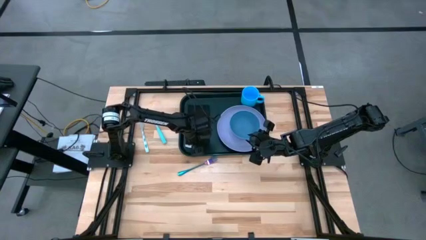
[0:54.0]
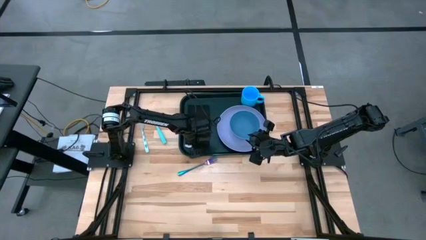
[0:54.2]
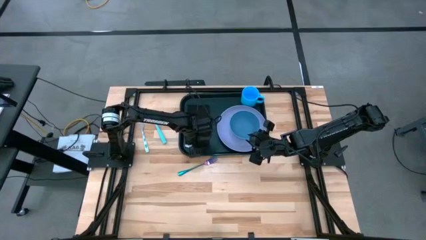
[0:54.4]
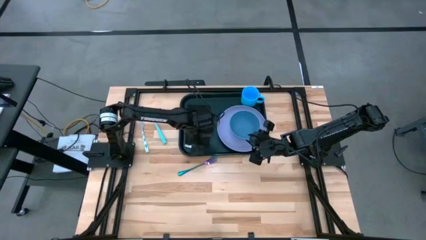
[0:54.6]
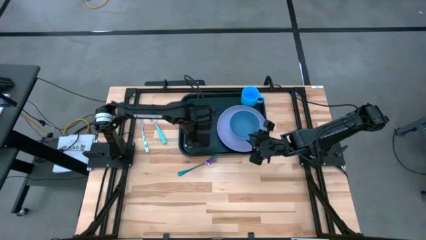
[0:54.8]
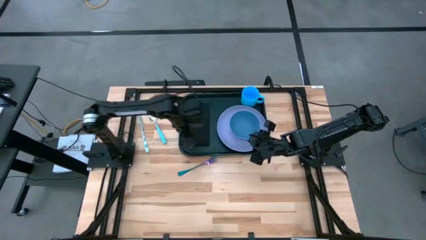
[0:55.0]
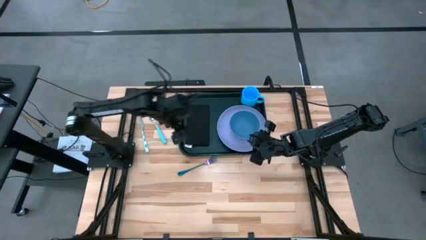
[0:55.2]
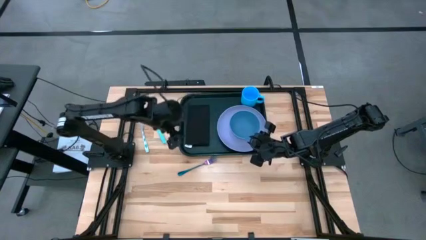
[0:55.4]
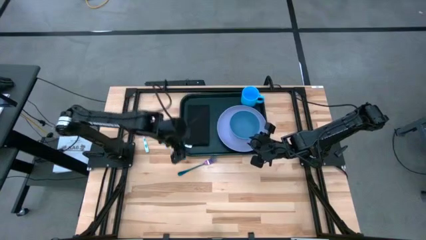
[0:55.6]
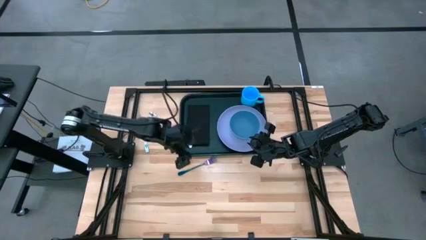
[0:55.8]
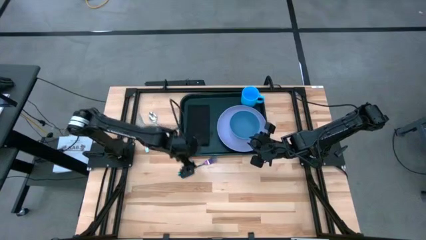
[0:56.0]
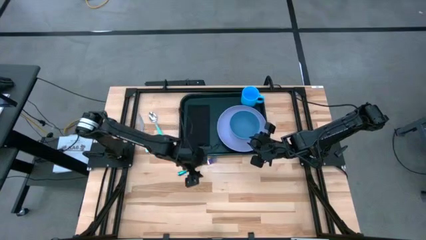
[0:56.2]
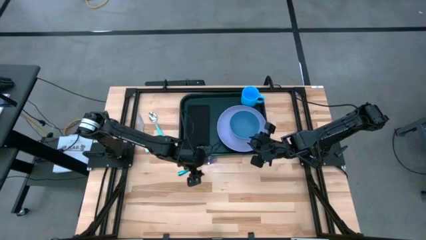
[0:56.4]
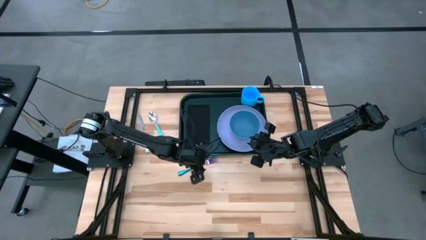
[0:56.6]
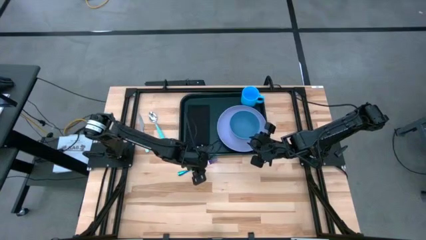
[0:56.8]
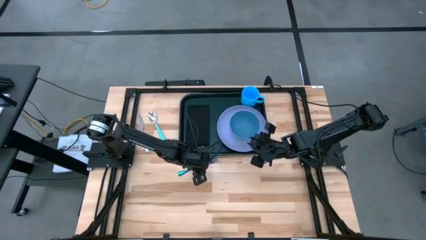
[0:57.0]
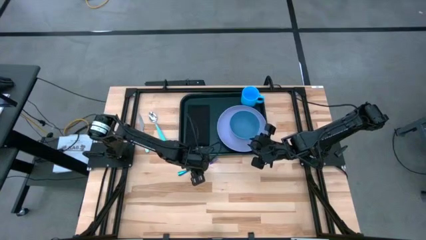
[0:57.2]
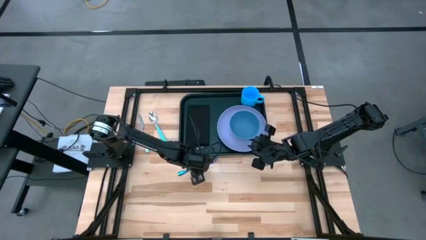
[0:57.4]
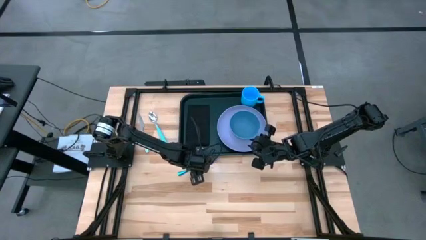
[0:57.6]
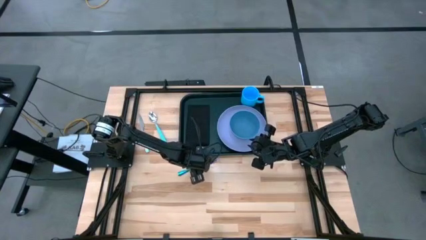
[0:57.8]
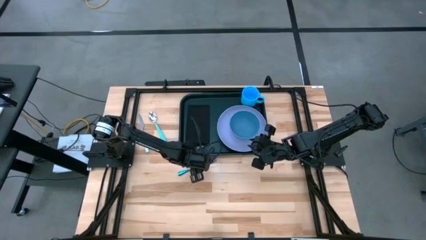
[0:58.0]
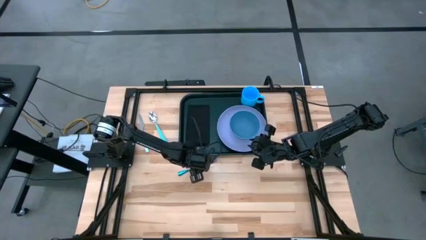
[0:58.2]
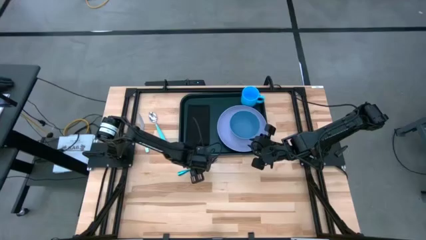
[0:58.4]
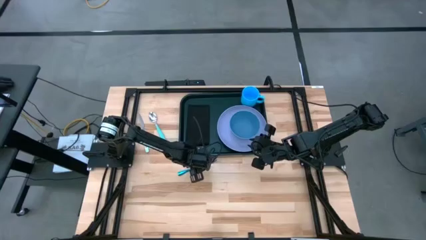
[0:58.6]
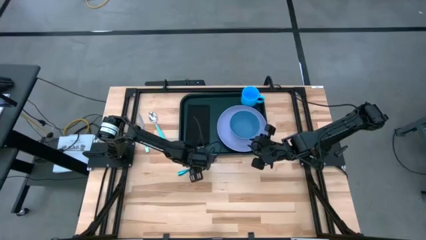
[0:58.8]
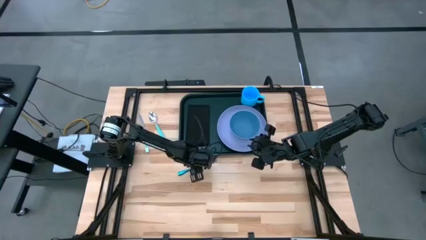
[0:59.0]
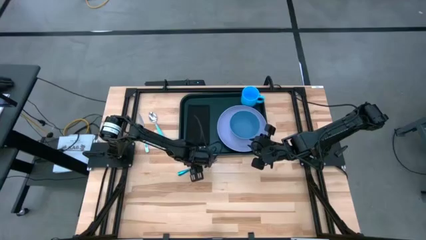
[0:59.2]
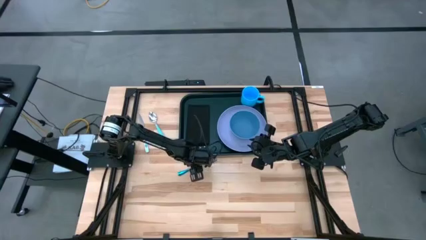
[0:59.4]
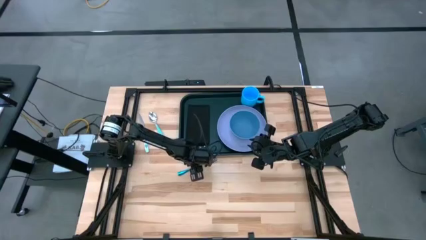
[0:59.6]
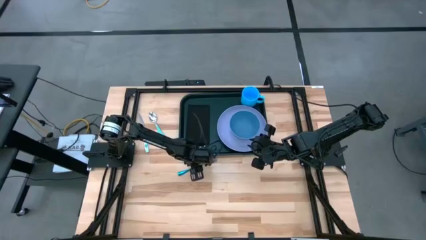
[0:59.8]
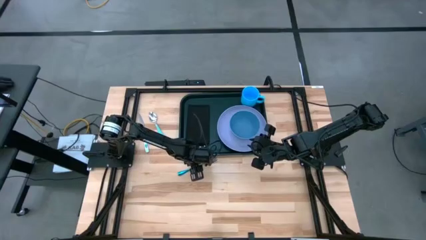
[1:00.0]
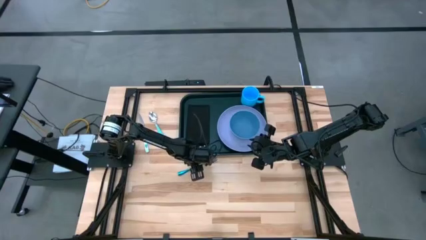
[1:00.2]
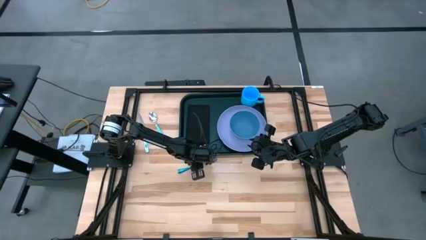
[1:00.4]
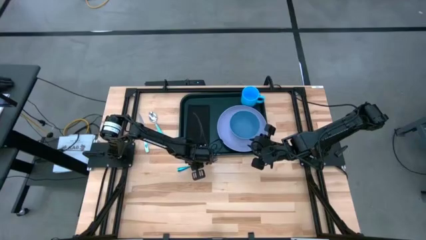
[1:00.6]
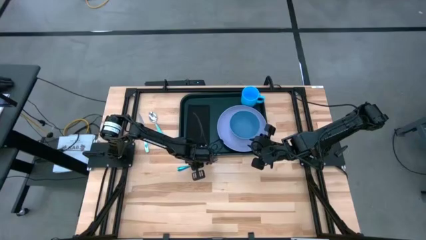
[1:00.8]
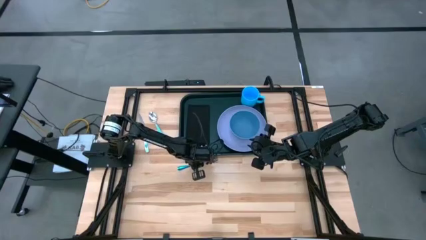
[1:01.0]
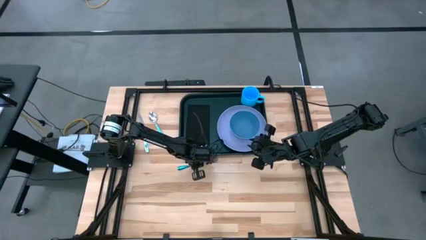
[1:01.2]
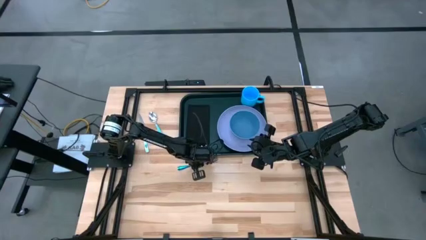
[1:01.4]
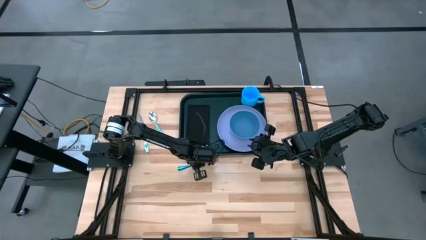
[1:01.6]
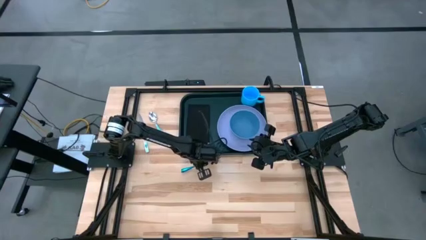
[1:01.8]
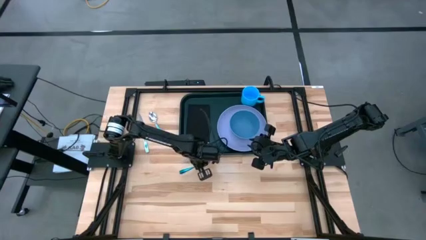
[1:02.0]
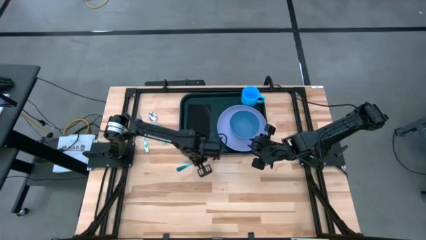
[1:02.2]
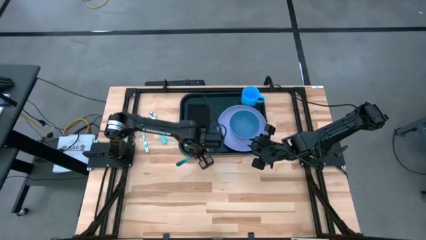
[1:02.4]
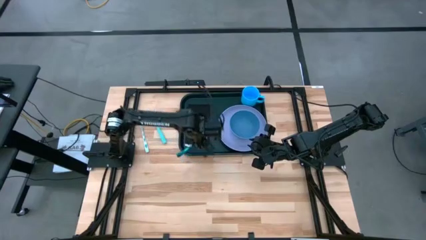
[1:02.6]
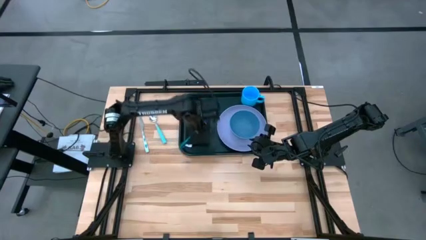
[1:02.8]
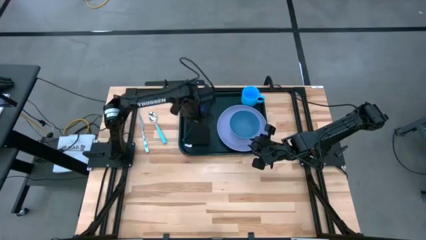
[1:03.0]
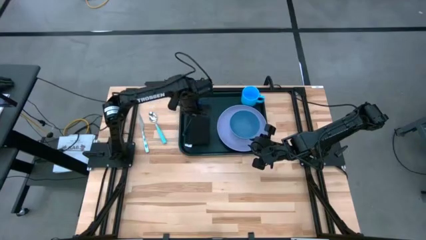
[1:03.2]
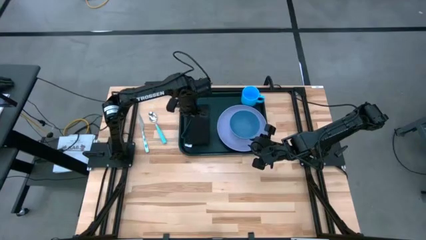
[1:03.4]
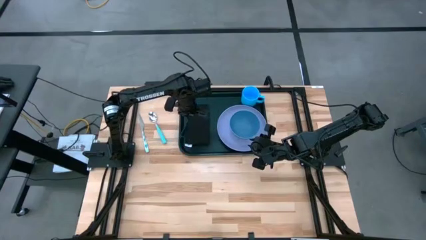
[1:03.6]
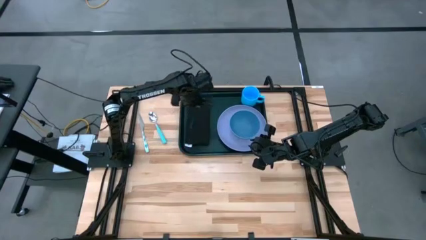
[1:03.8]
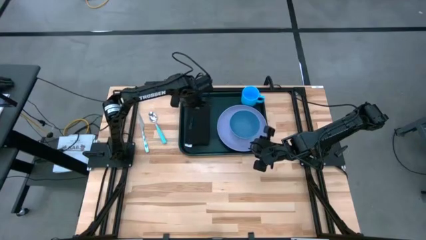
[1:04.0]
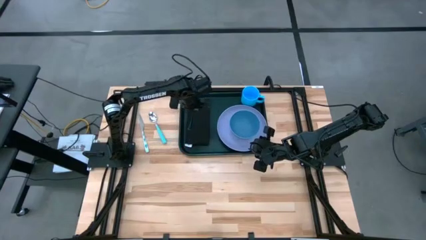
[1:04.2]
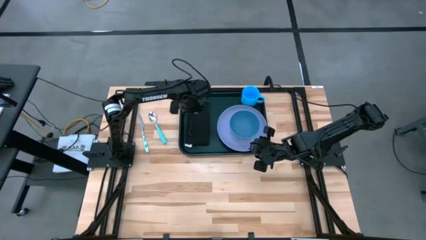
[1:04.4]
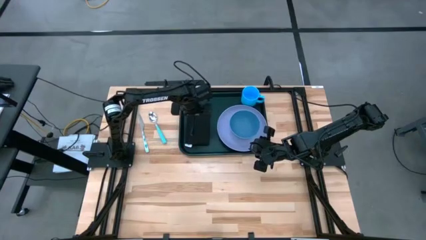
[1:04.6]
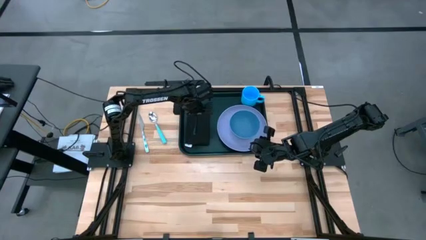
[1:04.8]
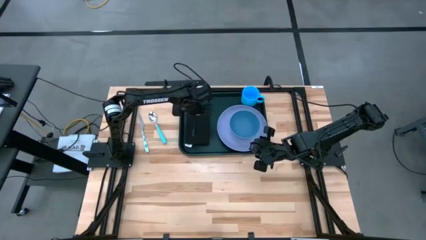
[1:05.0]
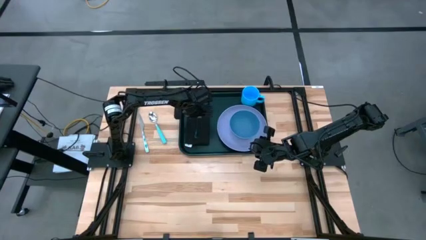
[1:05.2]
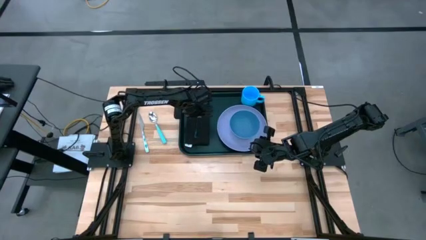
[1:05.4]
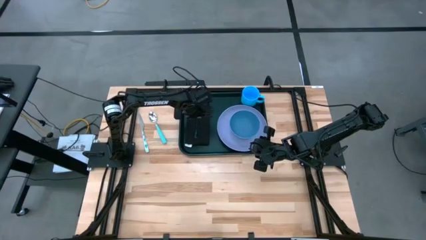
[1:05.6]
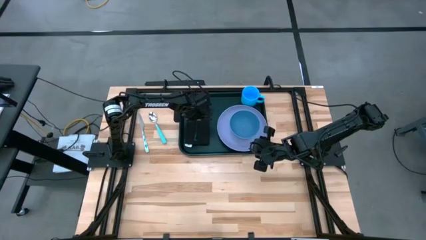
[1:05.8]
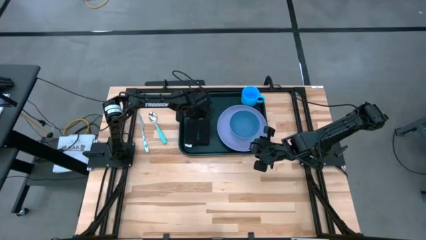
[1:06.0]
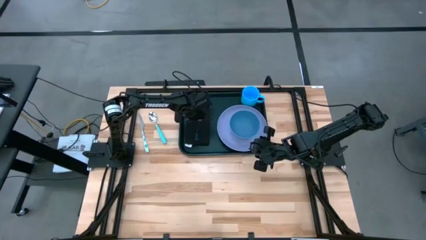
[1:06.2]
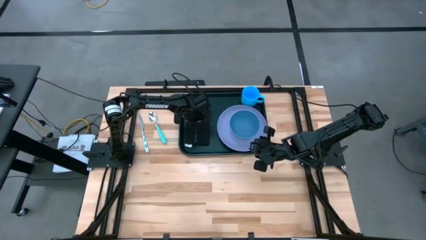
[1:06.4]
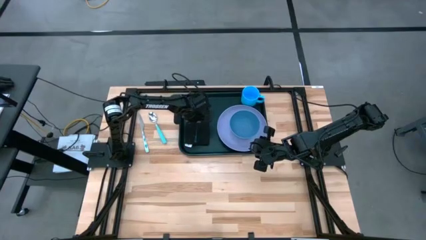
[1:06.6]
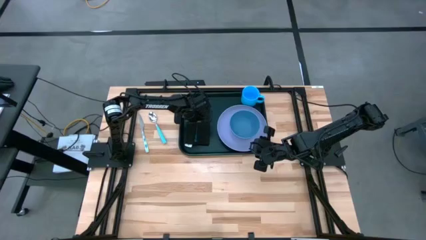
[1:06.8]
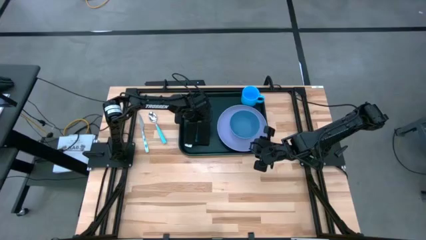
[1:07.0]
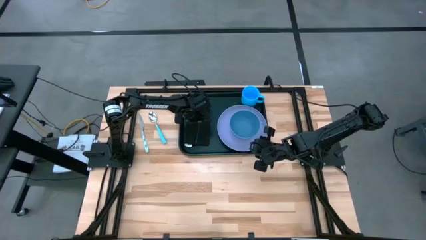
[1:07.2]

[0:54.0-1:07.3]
Task: Set up tray
Put the iridescent fork on the black napkin

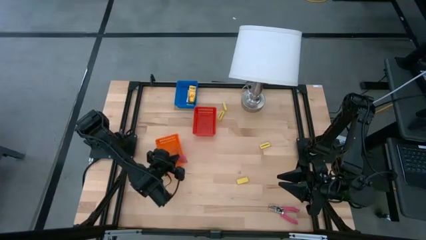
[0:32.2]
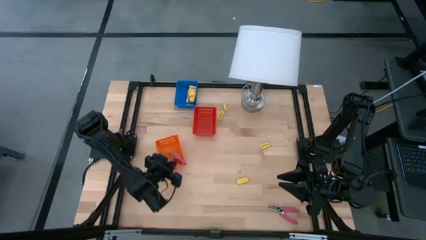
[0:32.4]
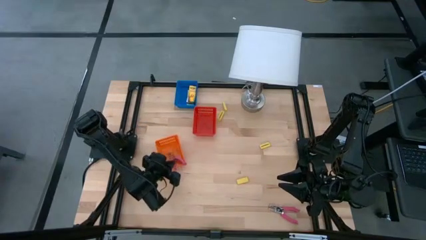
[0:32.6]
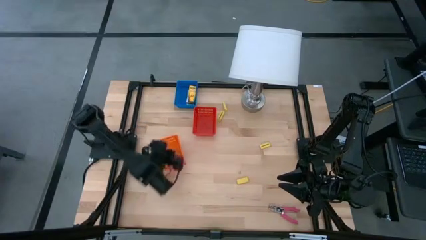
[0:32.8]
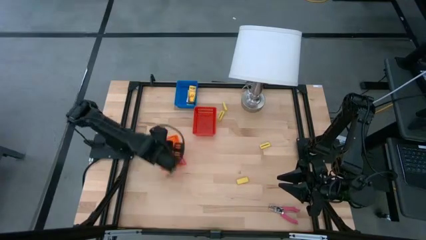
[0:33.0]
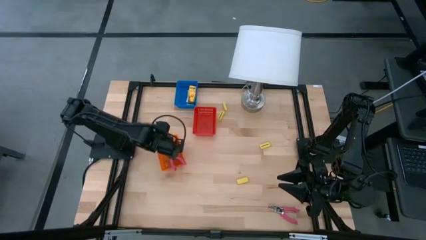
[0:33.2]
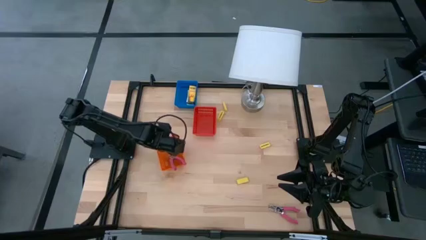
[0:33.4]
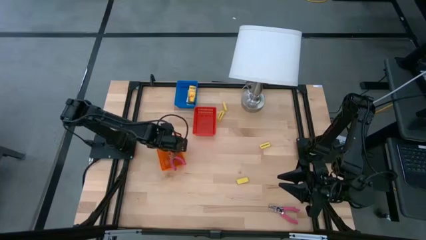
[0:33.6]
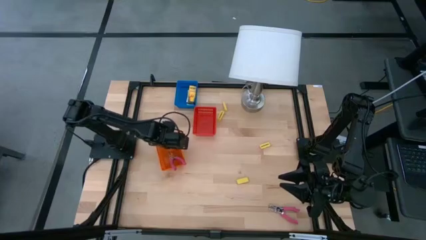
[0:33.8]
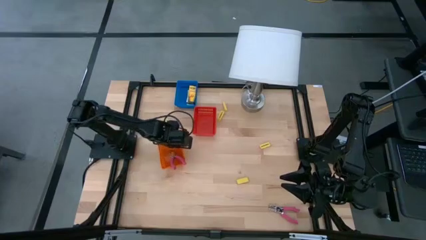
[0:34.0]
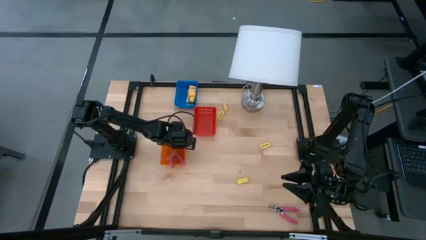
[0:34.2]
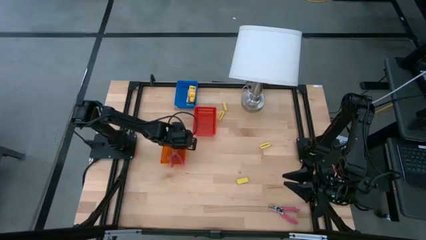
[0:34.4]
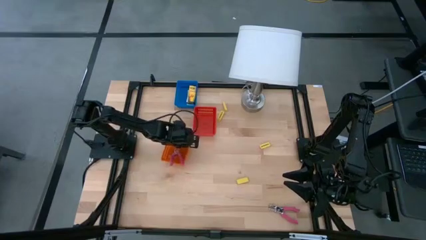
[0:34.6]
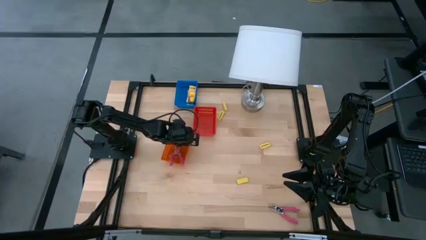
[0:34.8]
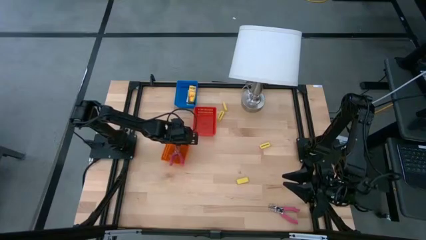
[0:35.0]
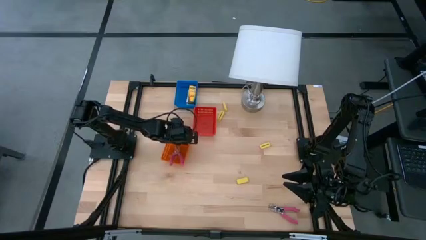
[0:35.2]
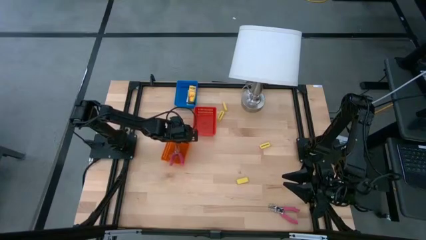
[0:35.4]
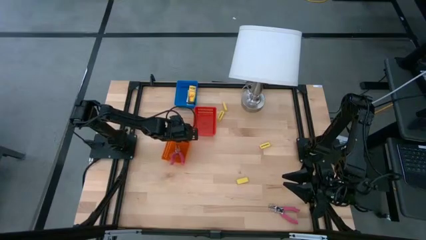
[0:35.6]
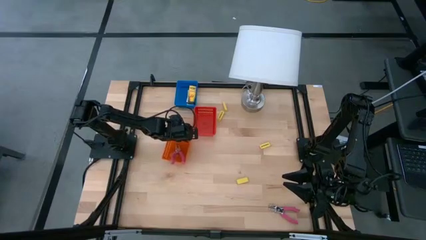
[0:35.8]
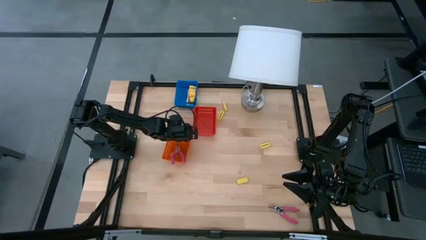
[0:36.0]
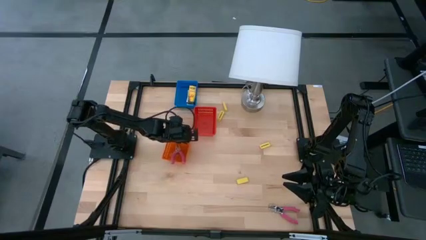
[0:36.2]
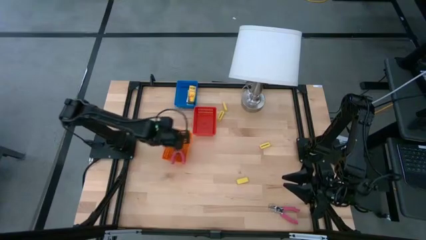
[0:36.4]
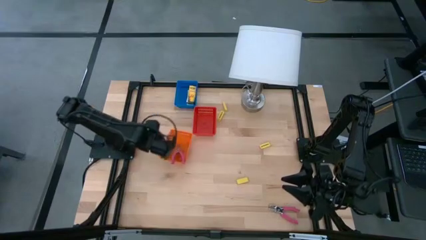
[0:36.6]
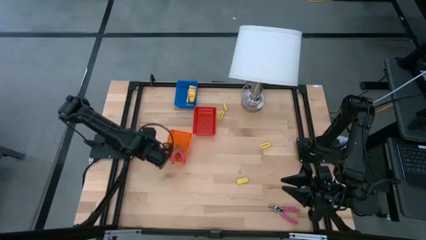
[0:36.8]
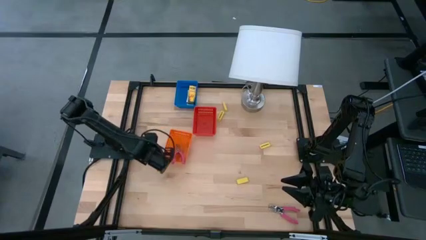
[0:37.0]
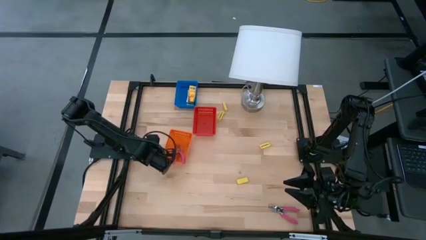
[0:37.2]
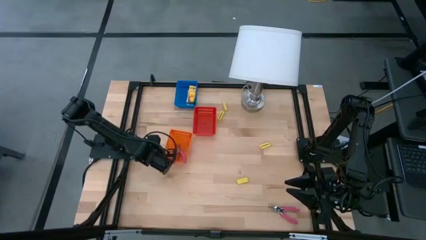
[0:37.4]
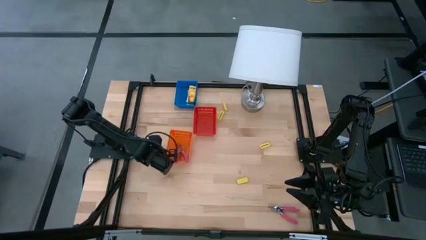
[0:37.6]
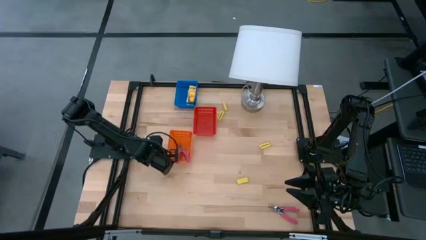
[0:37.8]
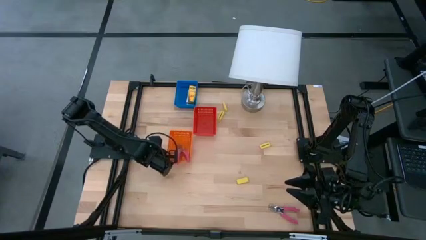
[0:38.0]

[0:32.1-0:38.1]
Task: Pick & Place School Supplies
Adjust the orange bin on the table
